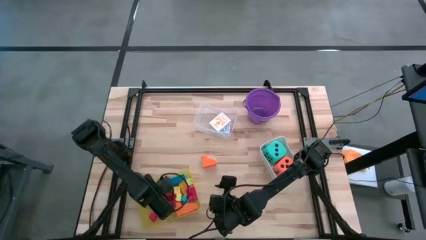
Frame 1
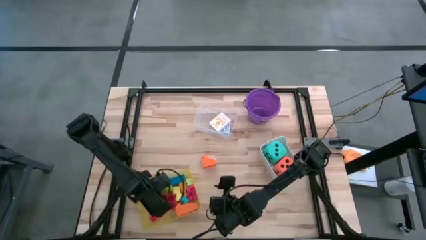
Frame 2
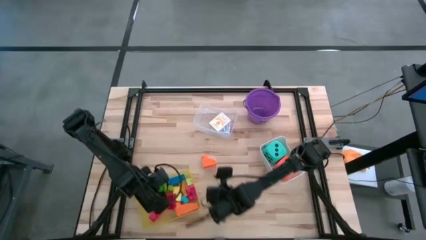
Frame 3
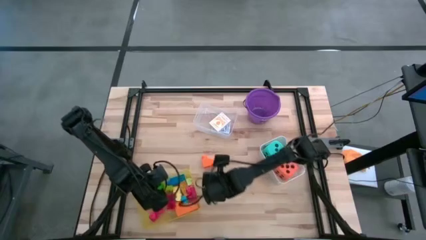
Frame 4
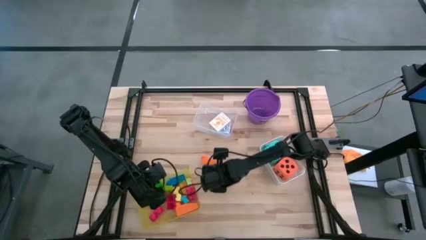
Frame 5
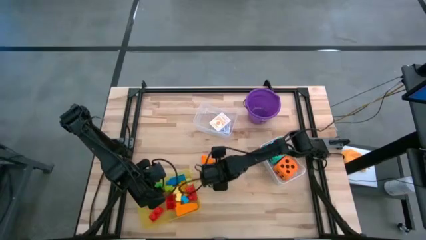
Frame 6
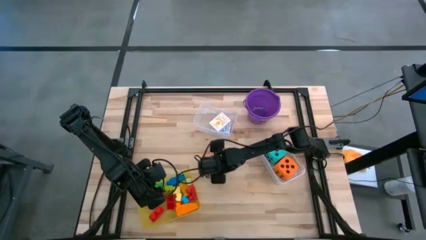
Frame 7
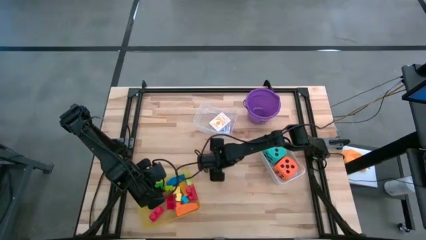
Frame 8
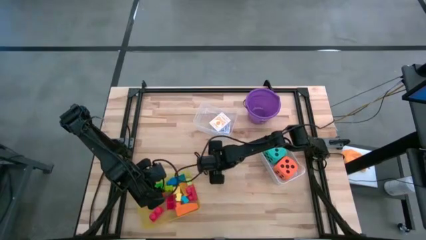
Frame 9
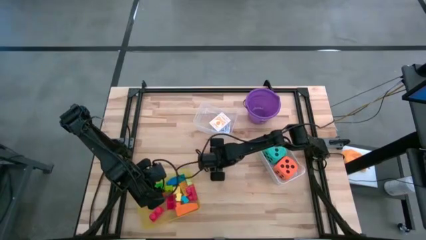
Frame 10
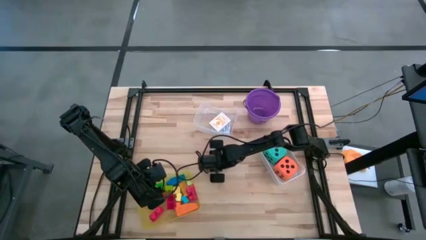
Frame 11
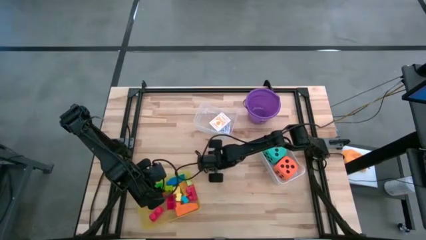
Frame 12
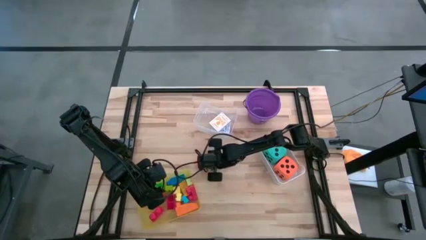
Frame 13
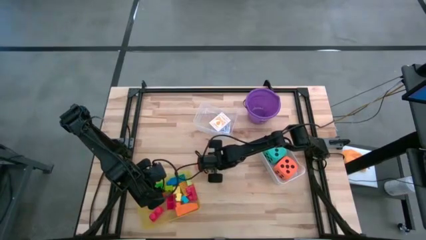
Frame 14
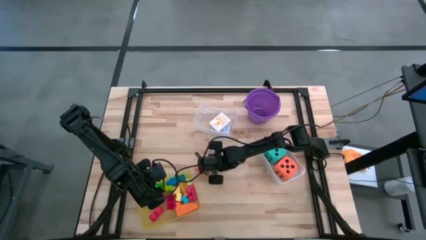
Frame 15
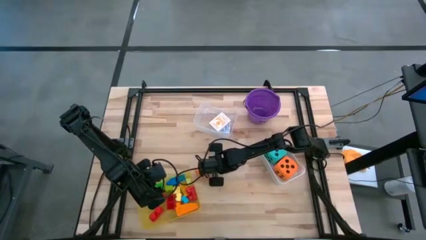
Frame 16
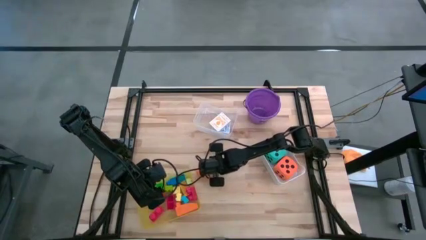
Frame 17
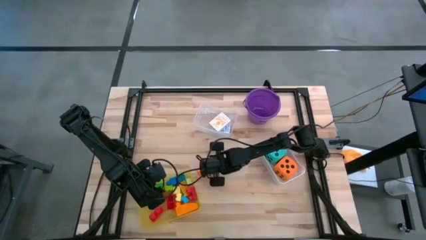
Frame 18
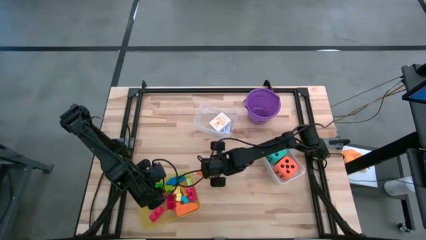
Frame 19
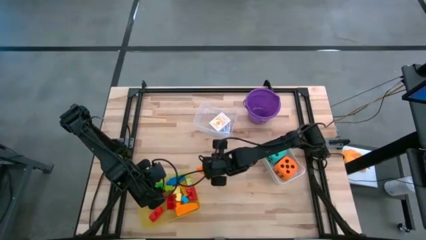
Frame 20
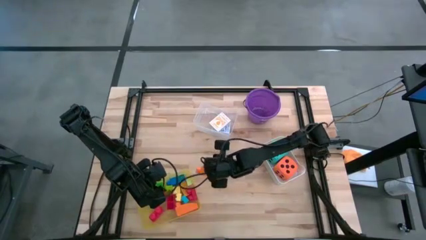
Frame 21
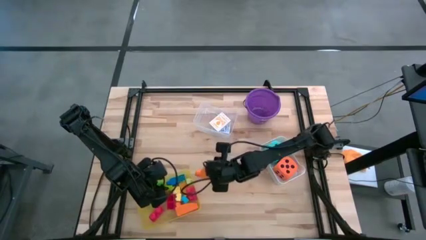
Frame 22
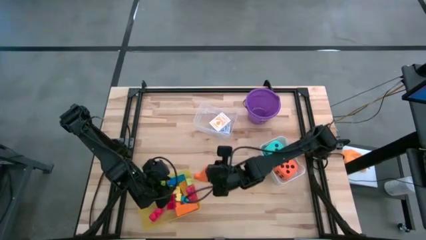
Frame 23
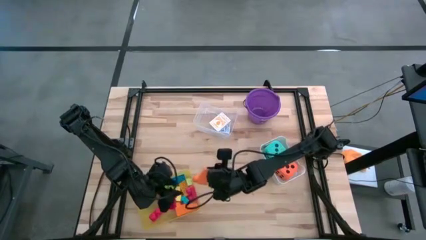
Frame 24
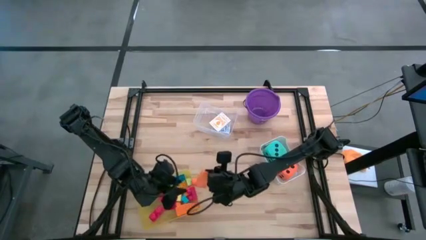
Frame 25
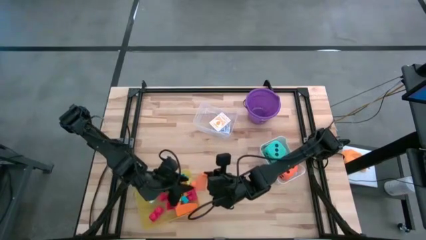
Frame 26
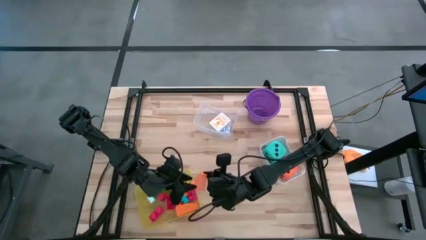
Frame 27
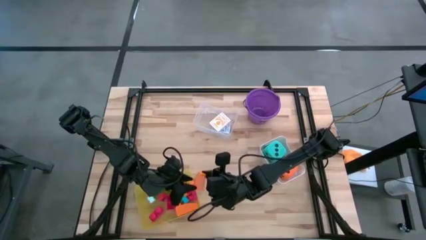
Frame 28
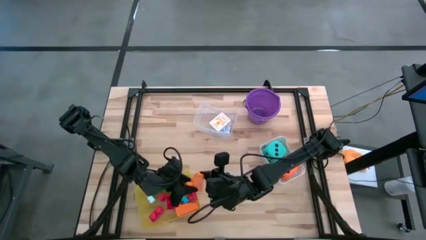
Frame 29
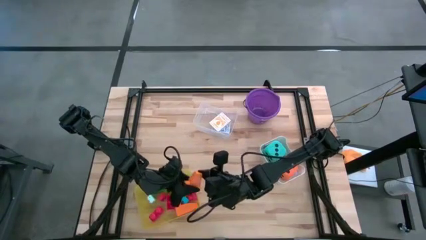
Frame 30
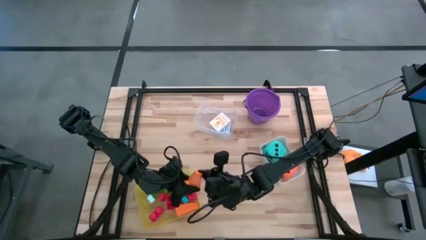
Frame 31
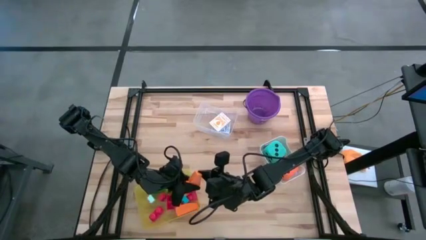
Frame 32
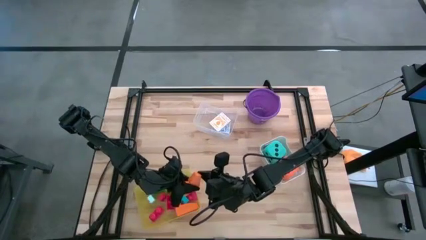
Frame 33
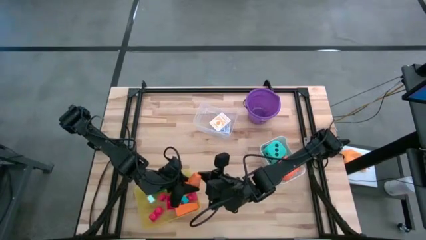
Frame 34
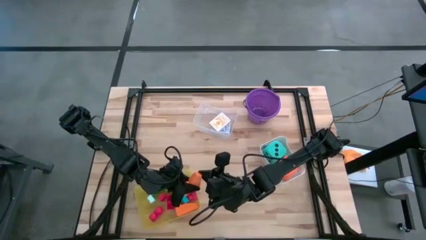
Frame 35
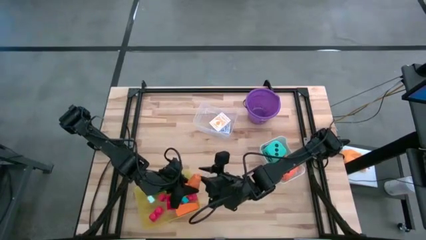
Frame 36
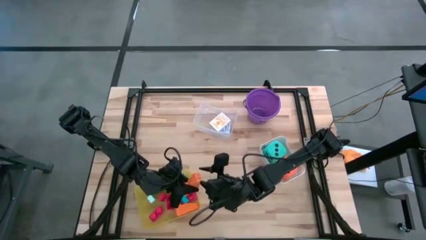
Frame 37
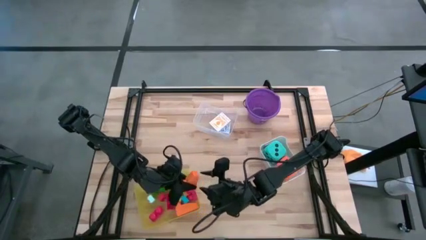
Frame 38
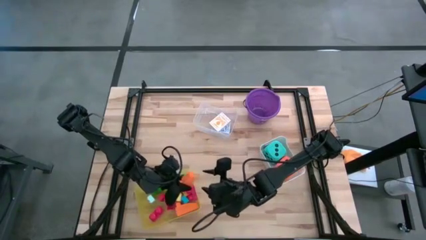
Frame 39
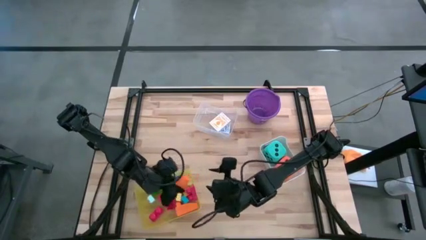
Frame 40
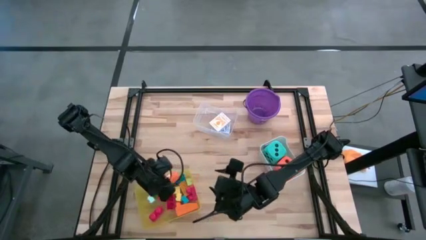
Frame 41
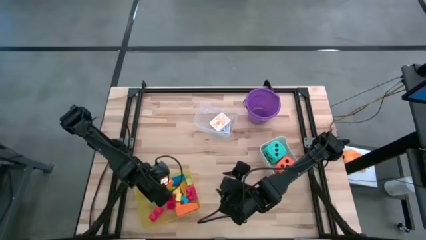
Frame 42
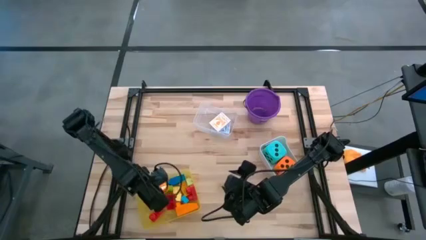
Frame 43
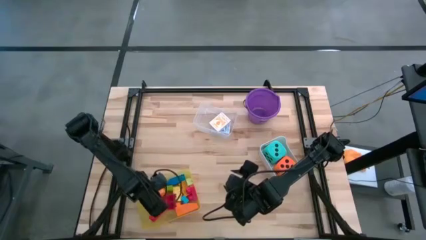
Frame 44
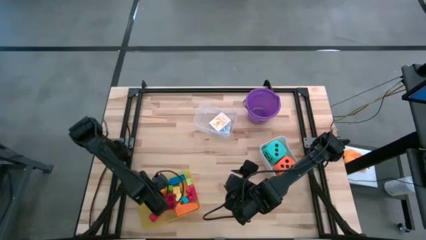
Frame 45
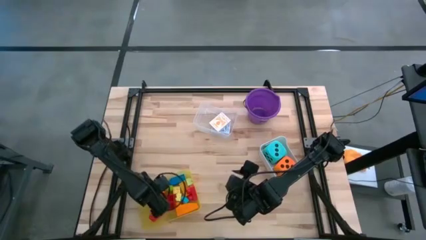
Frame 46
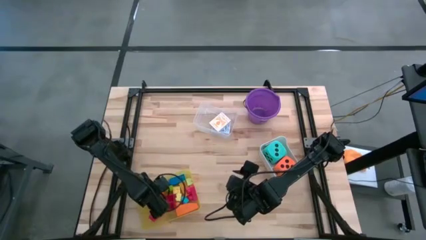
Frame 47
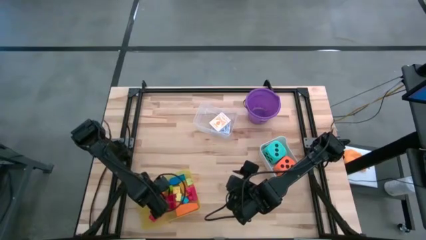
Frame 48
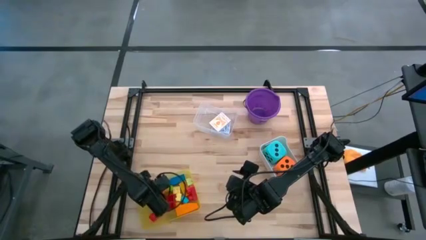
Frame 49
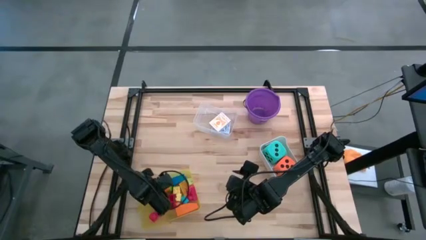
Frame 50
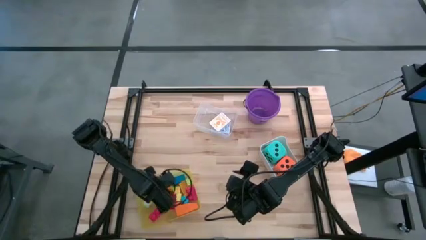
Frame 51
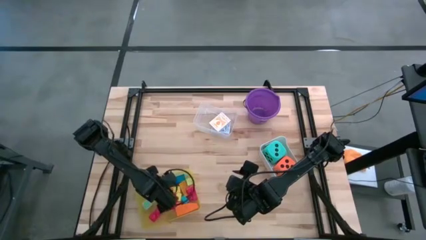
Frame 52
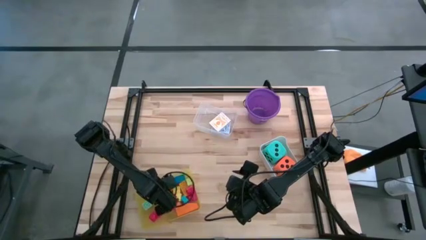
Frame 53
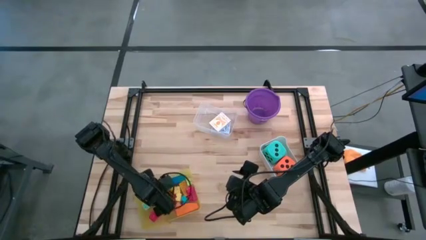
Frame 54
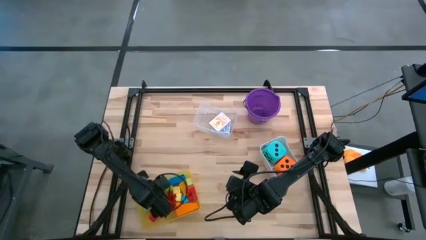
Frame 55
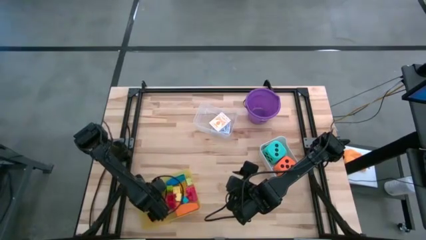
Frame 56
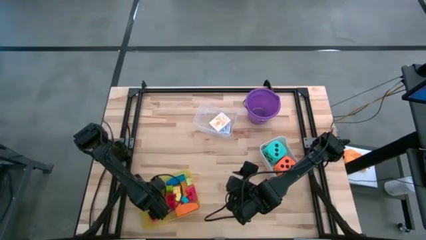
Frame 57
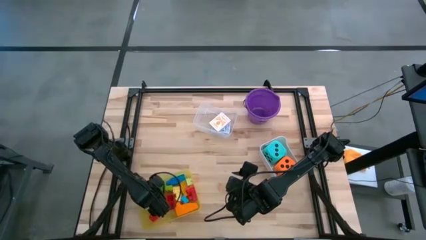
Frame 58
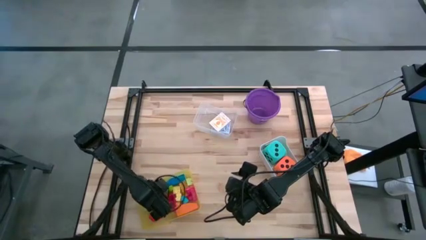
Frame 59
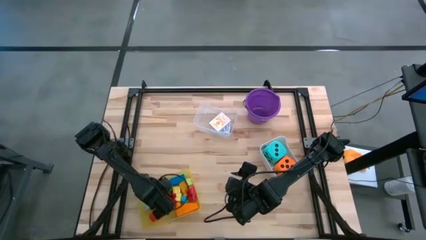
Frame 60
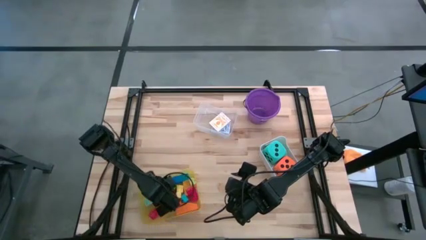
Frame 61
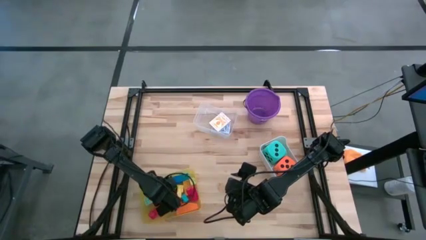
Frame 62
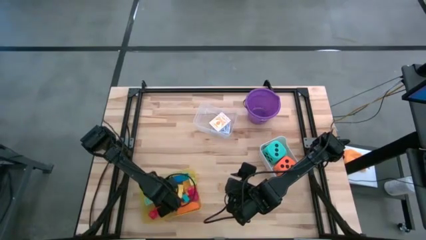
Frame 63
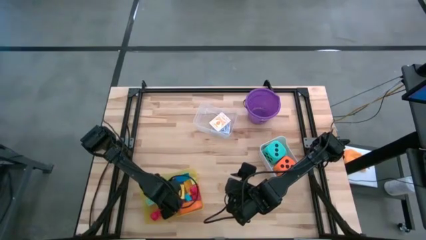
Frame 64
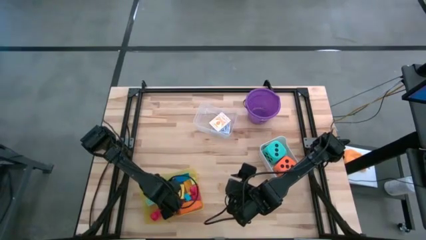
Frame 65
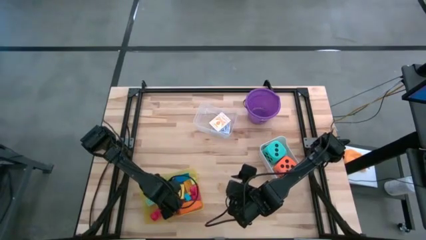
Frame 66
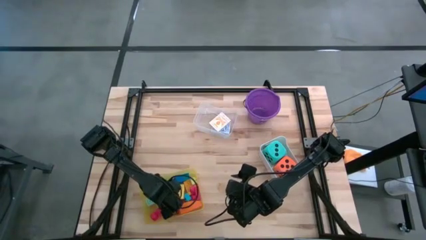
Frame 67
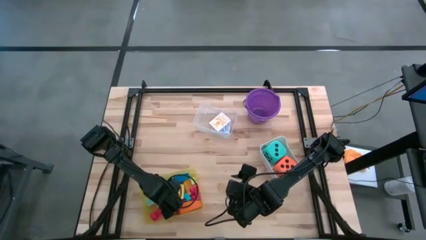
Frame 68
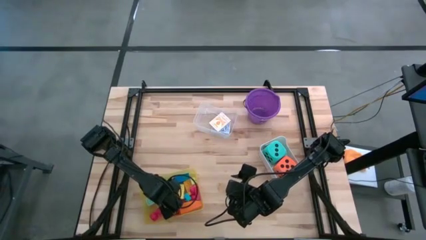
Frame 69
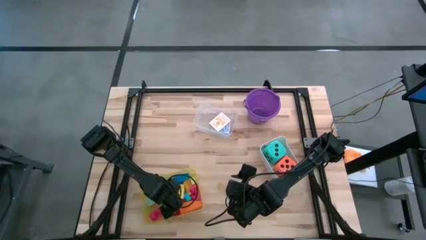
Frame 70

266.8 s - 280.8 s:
Task: Pick & Place Toys
Put the orange game piece into the yellow bin
